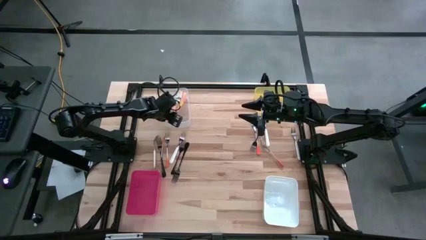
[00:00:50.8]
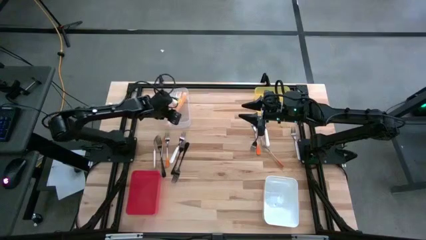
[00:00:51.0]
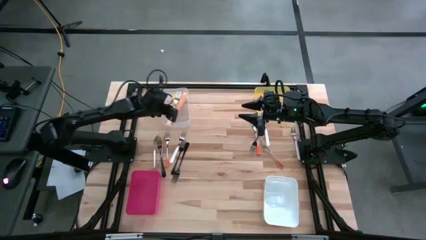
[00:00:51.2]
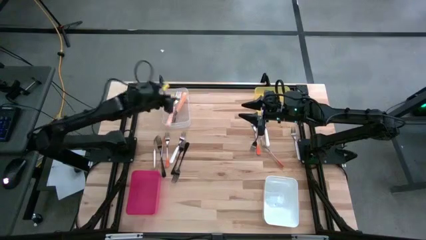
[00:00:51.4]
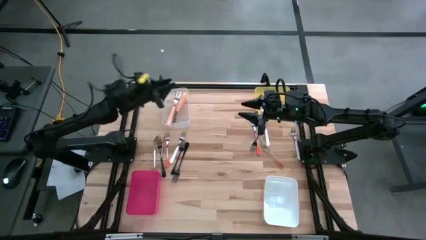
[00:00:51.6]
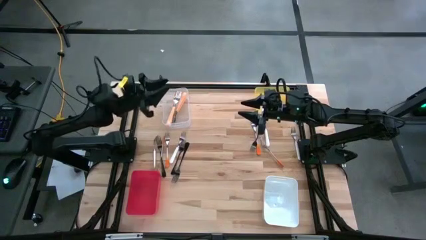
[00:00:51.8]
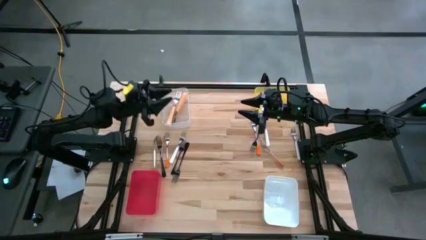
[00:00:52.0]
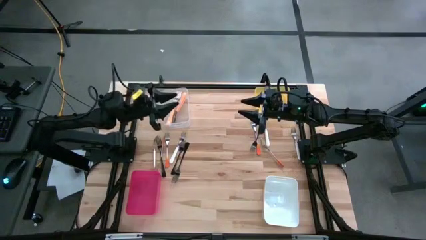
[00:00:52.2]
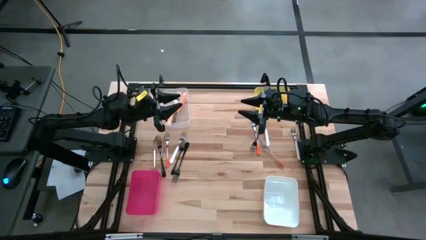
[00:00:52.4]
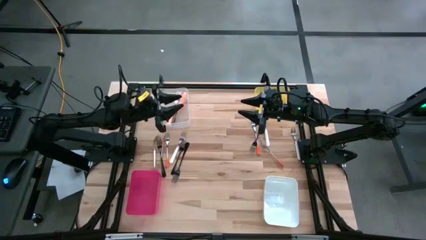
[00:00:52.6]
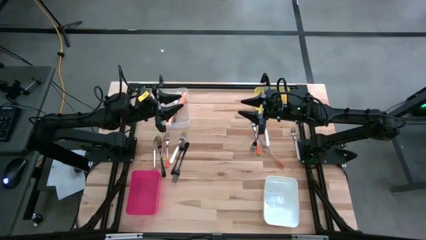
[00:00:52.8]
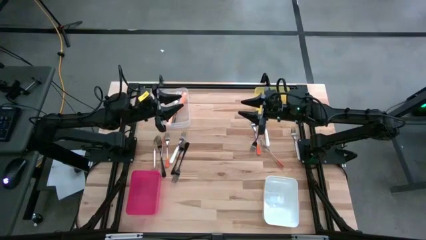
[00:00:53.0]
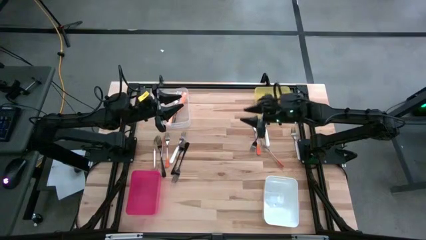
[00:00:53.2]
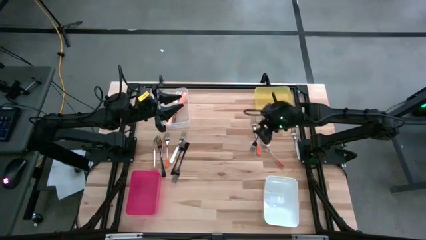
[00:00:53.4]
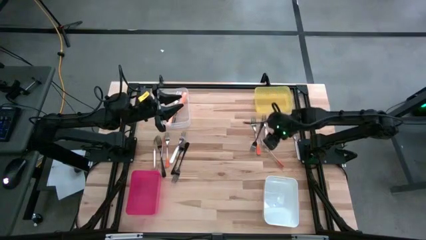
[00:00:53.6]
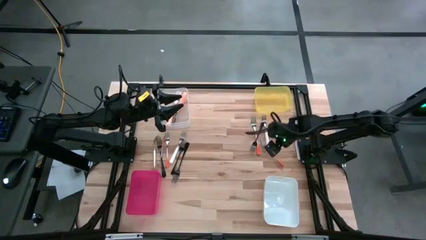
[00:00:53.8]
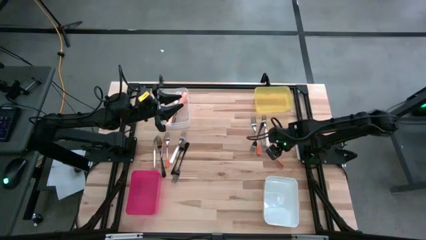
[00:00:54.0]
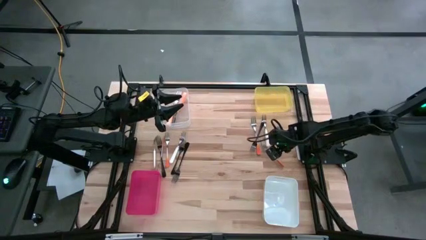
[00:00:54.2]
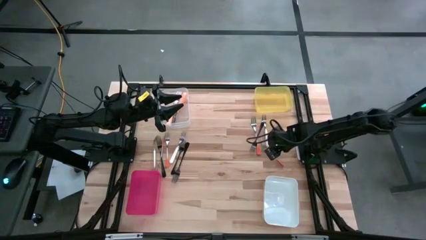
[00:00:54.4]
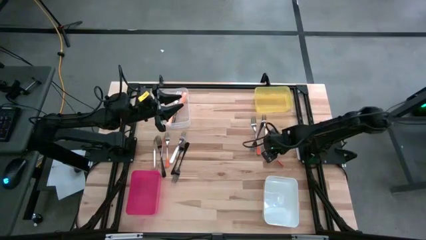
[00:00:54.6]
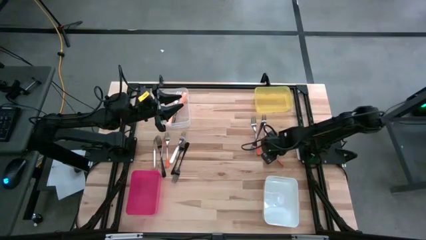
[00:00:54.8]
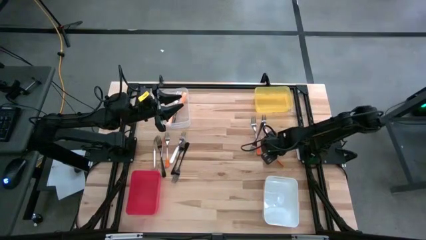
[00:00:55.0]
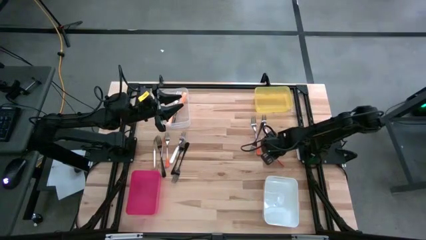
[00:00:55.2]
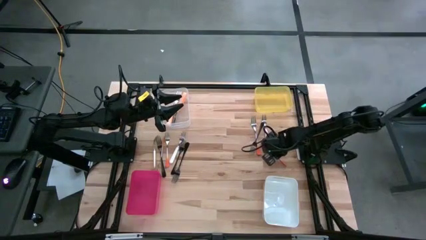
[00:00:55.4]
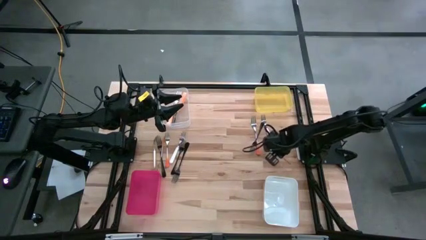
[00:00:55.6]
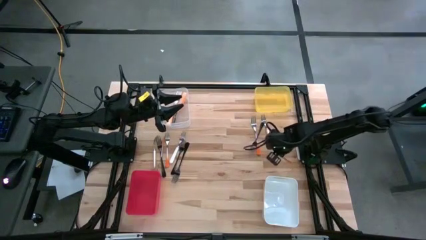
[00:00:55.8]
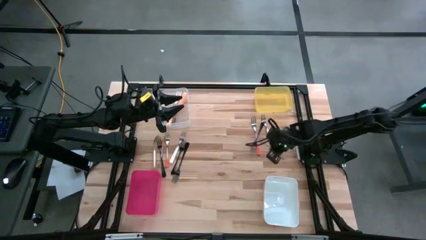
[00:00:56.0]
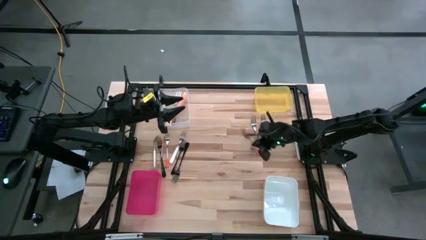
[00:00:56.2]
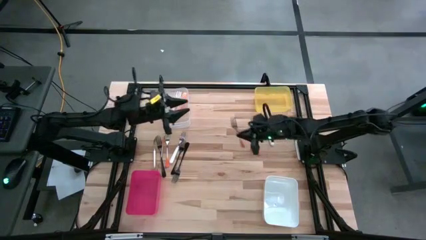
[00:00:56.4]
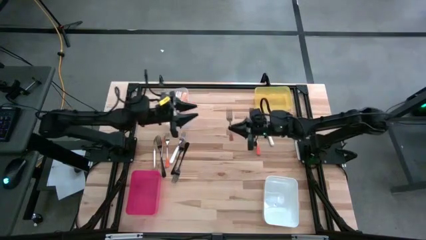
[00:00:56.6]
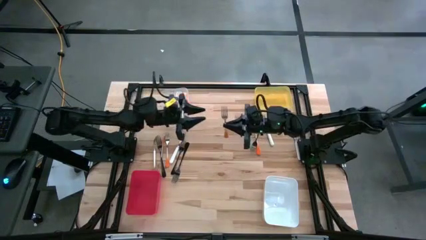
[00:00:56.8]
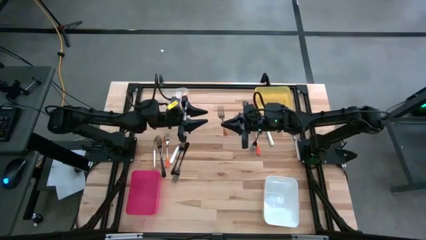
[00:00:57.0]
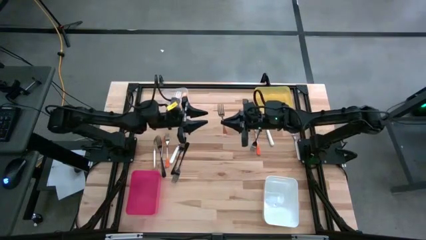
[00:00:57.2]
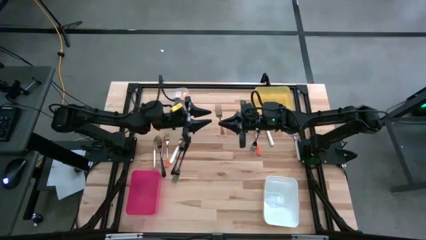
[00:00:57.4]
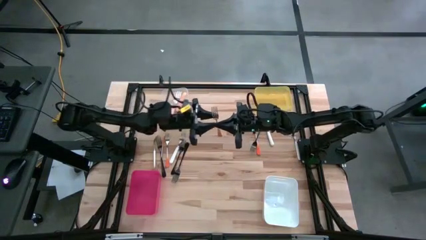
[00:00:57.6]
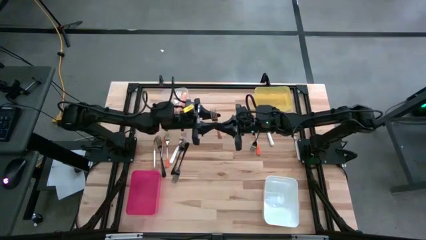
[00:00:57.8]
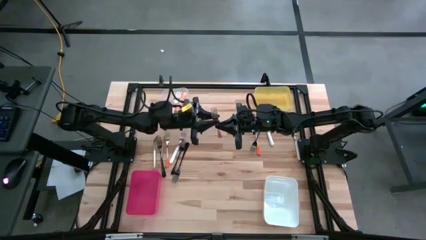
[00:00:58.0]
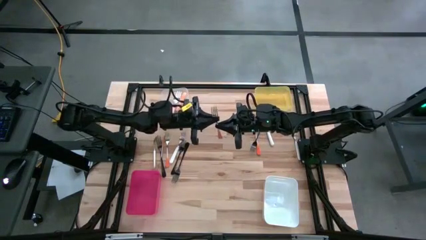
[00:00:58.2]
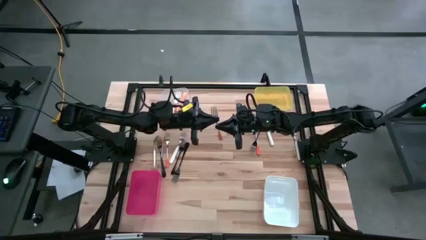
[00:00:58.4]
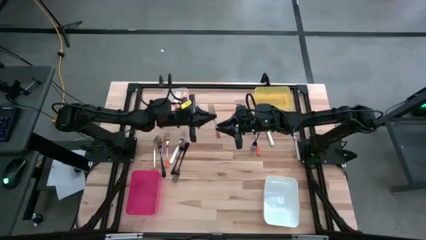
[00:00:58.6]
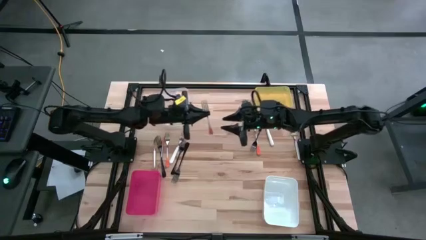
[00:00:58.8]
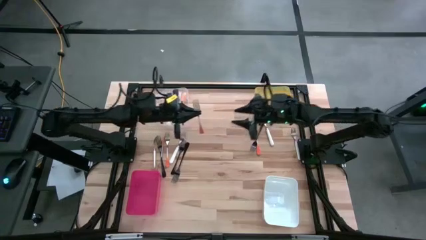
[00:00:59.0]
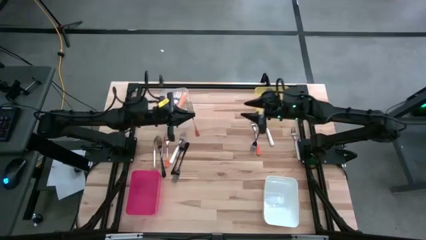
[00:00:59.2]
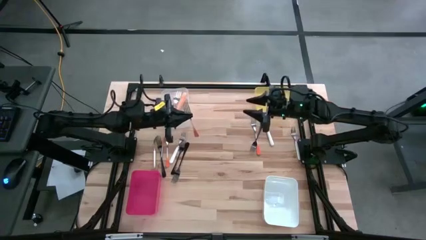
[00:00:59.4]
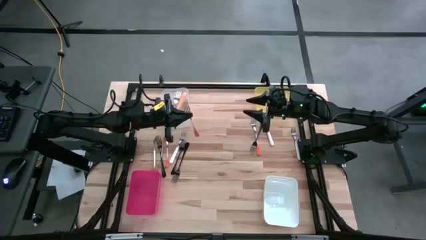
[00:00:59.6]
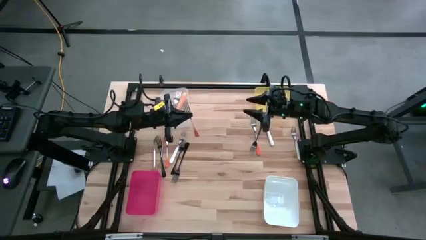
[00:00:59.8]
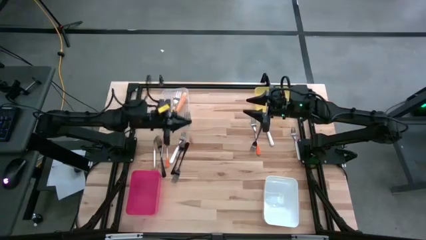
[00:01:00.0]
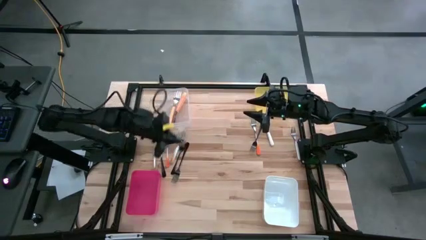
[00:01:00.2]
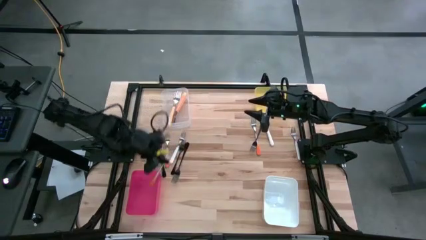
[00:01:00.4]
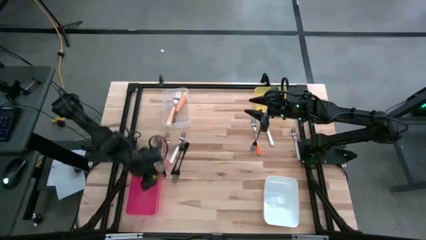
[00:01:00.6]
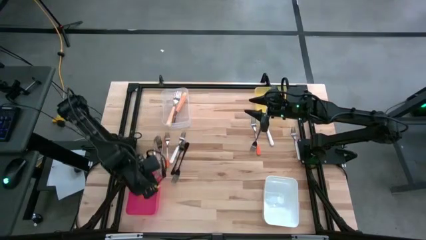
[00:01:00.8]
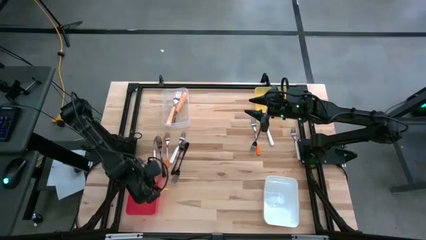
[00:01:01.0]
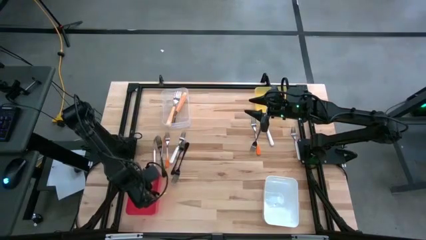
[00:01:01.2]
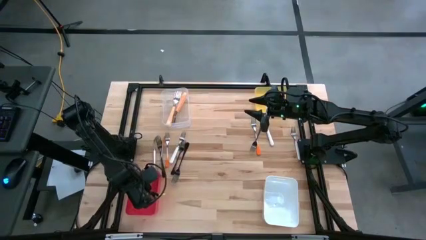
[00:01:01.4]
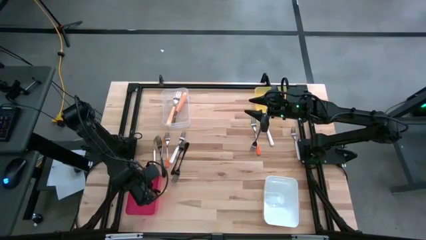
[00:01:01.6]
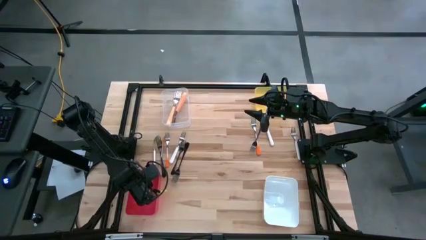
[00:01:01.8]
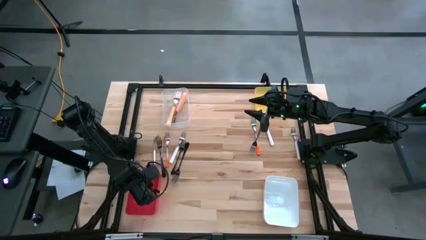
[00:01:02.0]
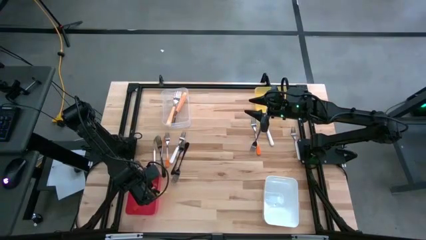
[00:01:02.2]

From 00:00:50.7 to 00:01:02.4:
Task: Sort silverware by color (type)
Put the orange-white fork into the red bin
